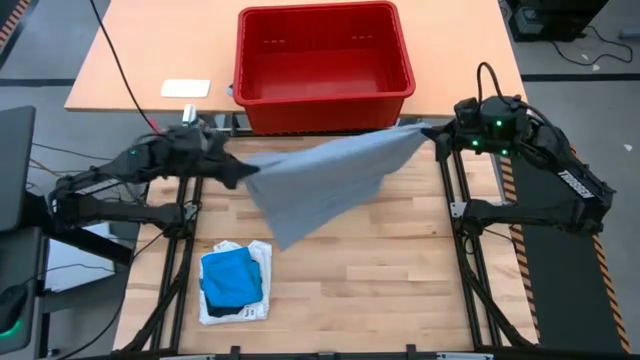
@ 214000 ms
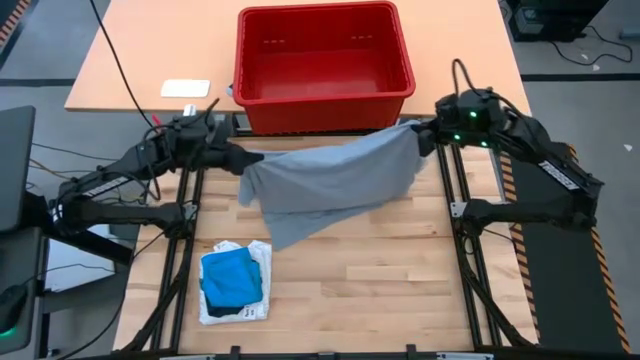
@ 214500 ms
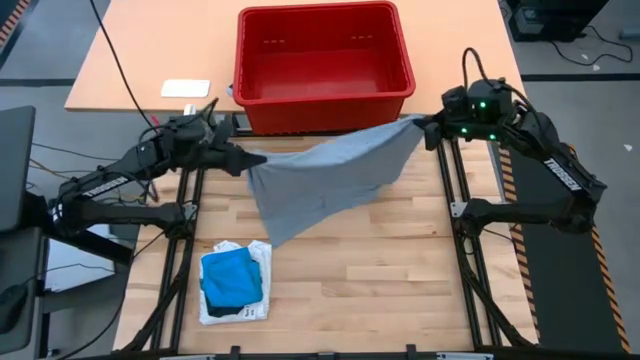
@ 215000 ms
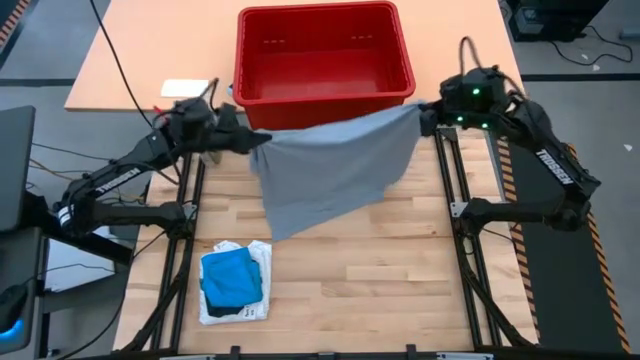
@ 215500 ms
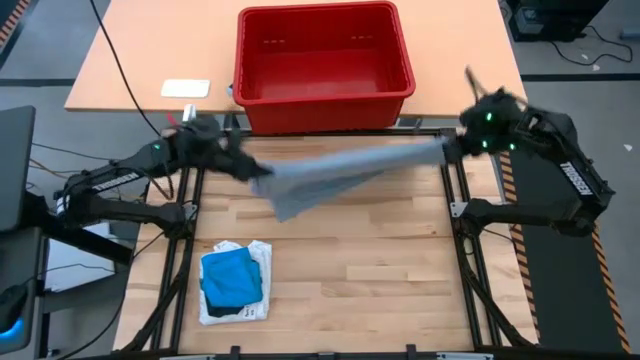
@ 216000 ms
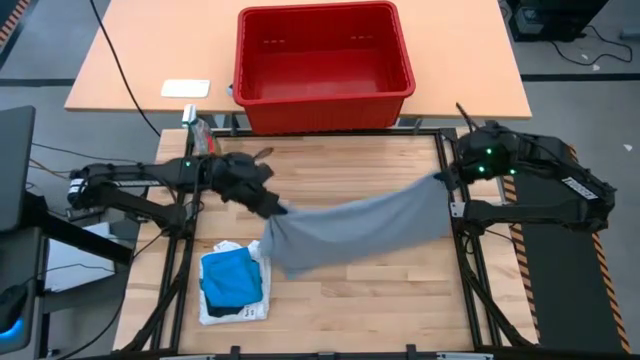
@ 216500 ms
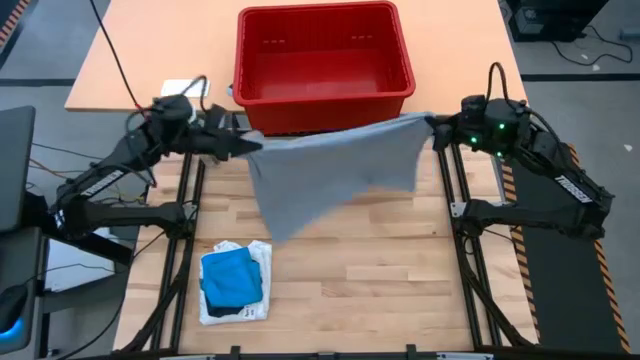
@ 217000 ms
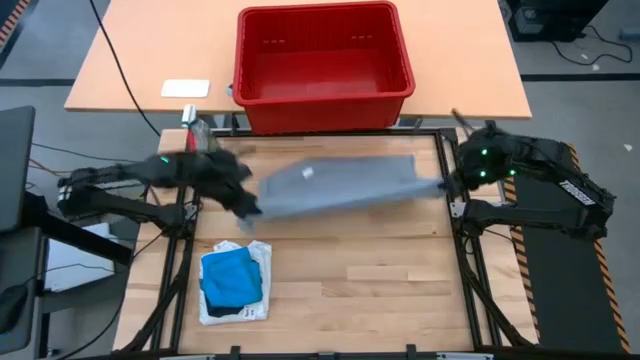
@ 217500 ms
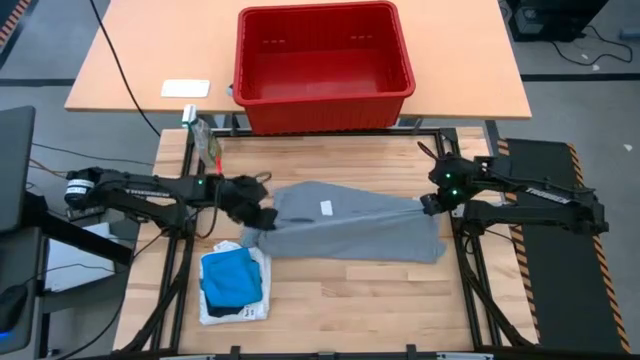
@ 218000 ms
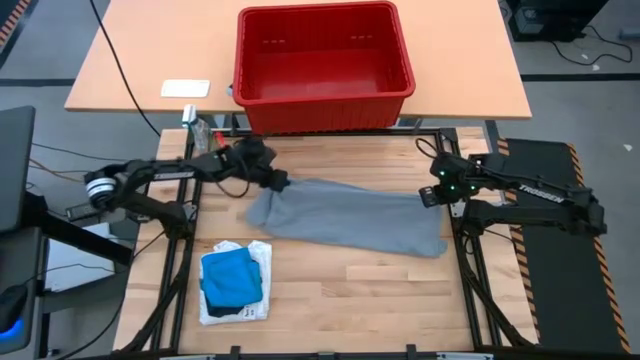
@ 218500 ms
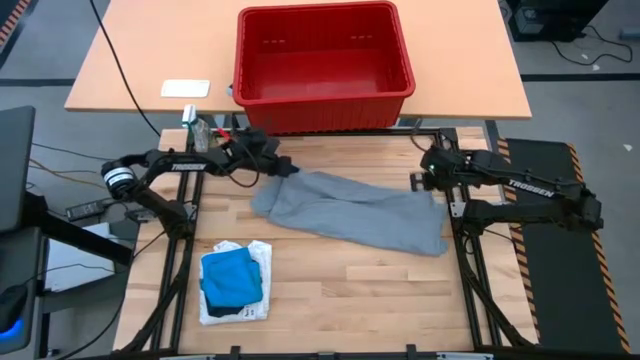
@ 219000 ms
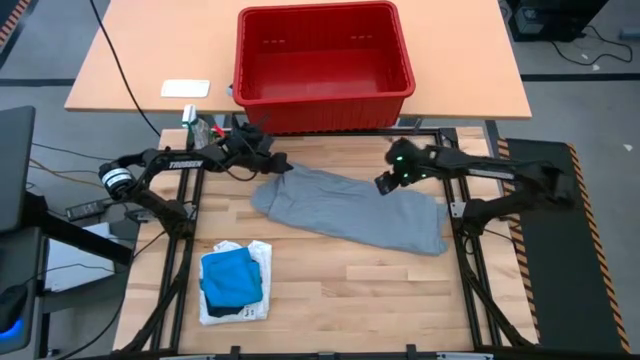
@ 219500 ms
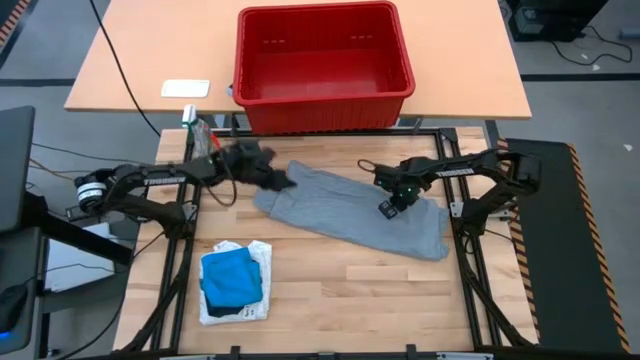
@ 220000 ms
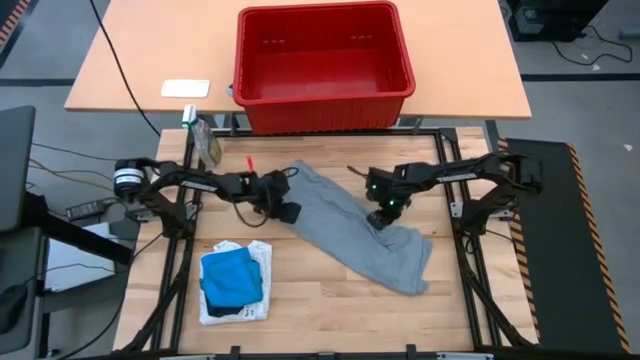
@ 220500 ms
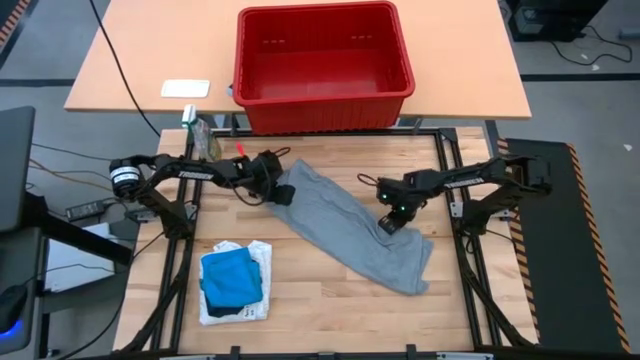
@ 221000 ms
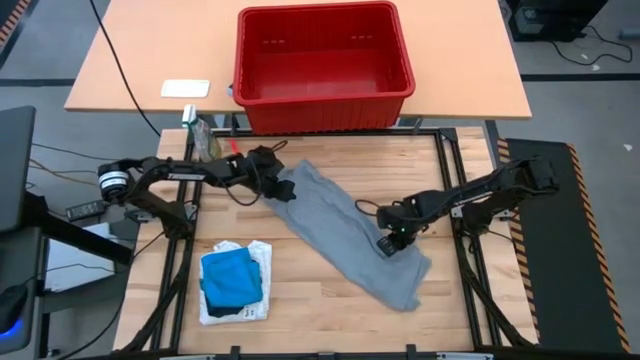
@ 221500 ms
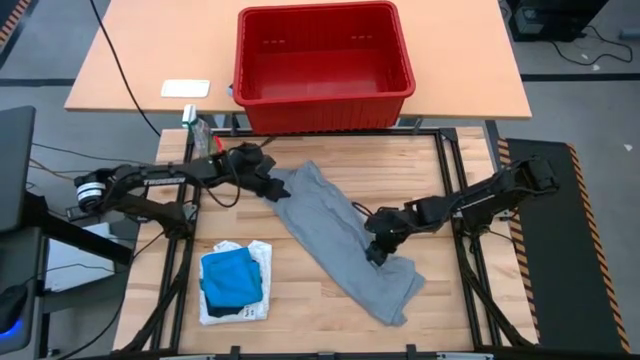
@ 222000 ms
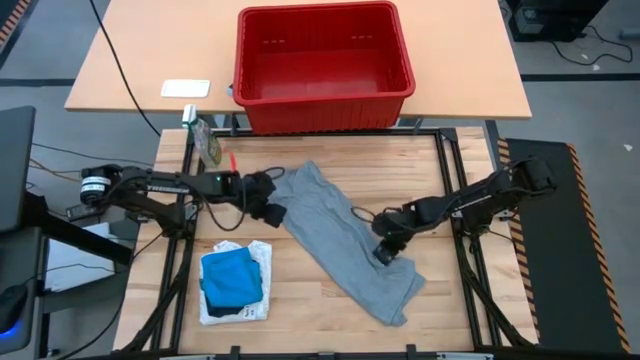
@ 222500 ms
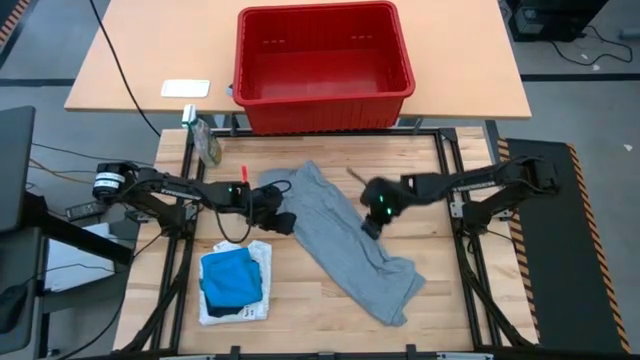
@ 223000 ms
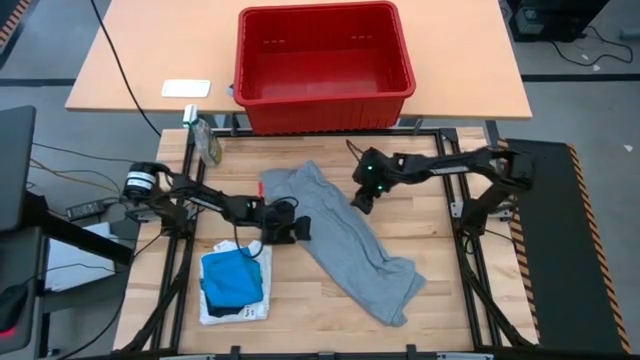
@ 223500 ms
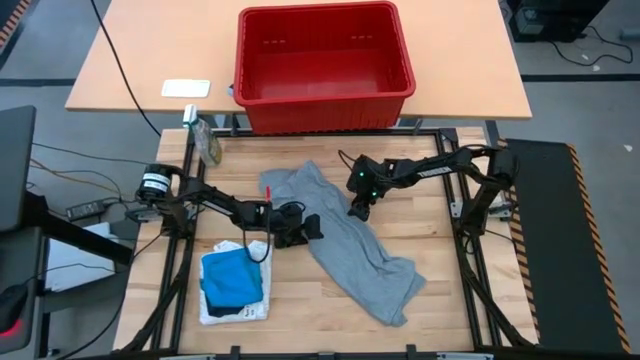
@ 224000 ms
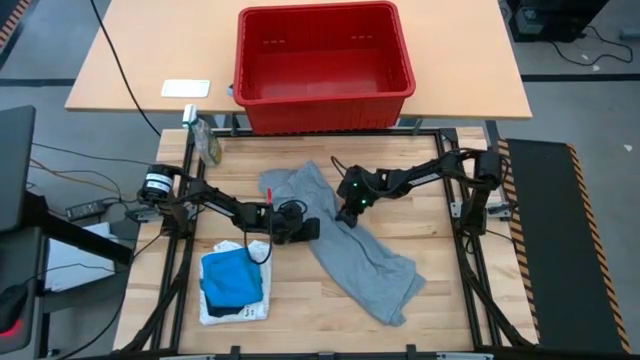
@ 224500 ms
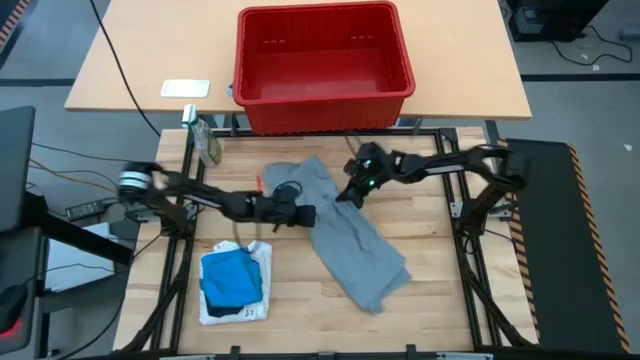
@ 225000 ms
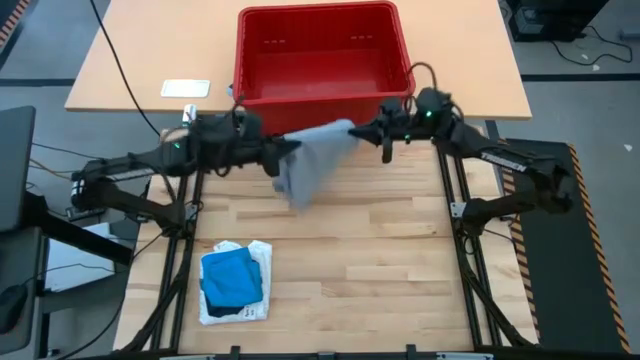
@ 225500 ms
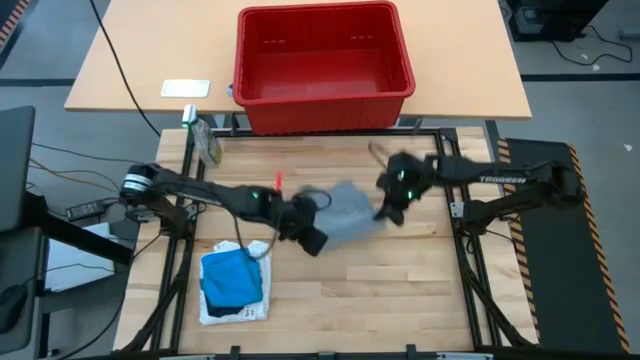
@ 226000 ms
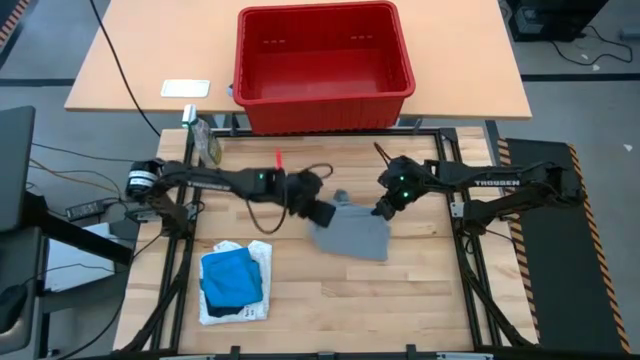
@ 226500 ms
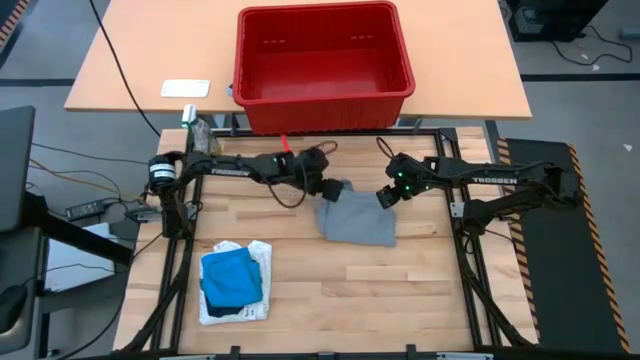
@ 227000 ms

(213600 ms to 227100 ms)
Task: Fold laundry
Fold the grey shirt on the table

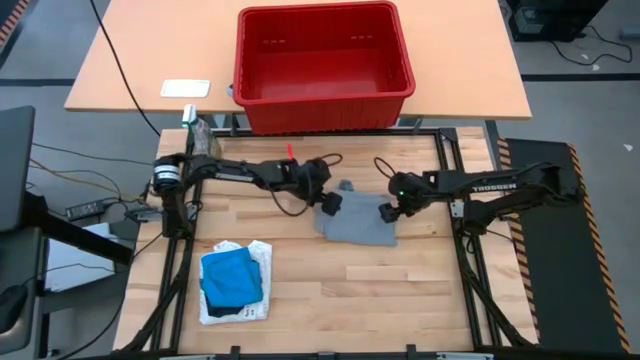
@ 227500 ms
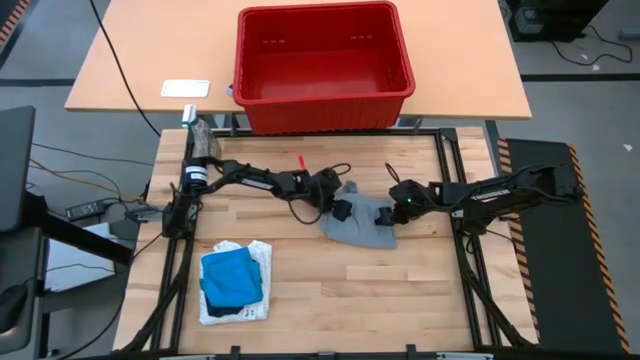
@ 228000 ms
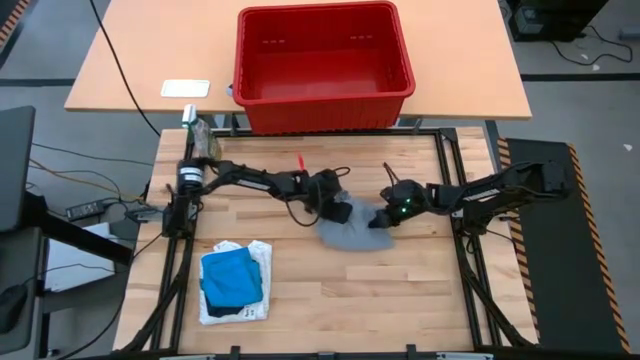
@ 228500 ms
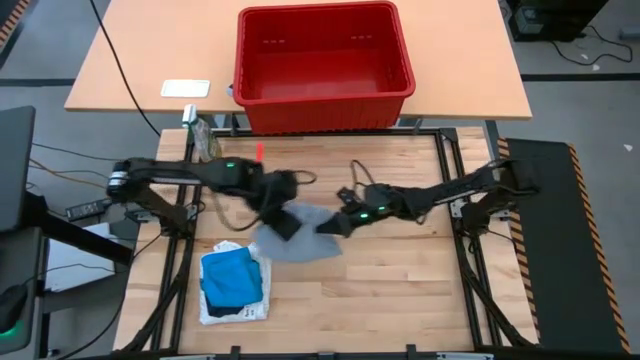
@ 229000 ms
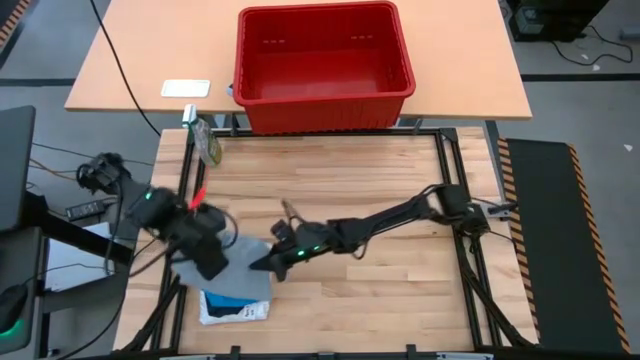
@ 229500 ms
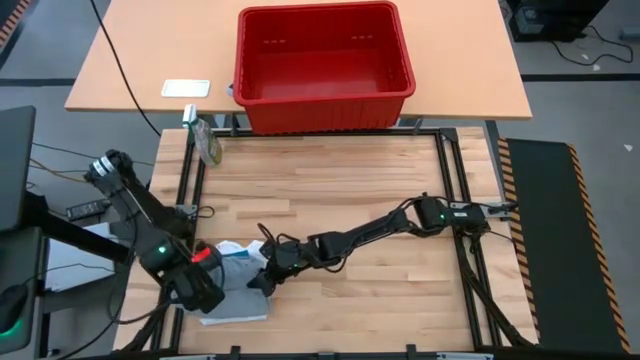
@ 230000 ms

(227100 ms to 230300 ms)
Stack the gray shirt on top of the light blue shorts

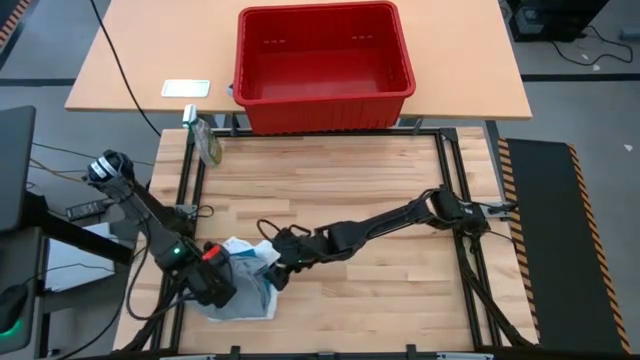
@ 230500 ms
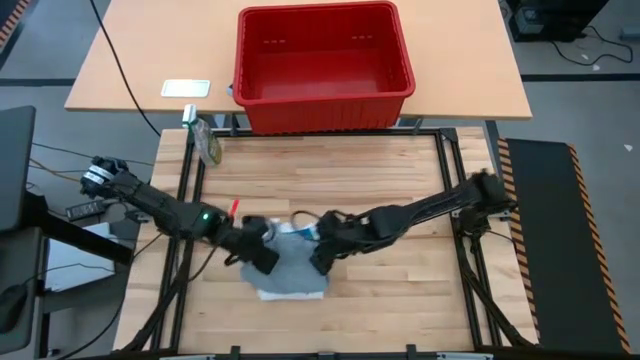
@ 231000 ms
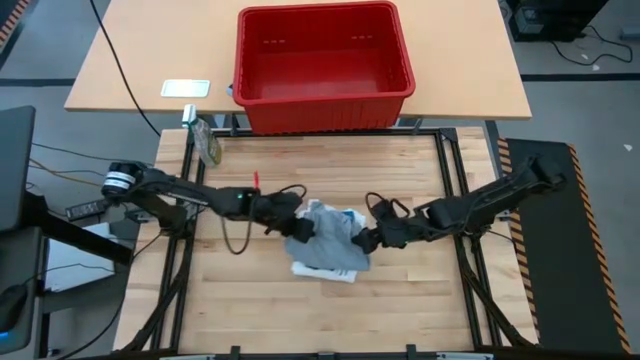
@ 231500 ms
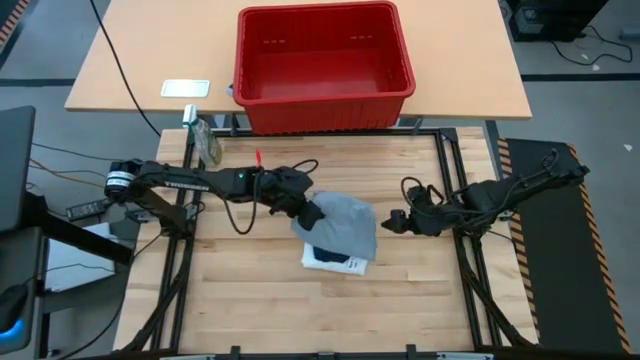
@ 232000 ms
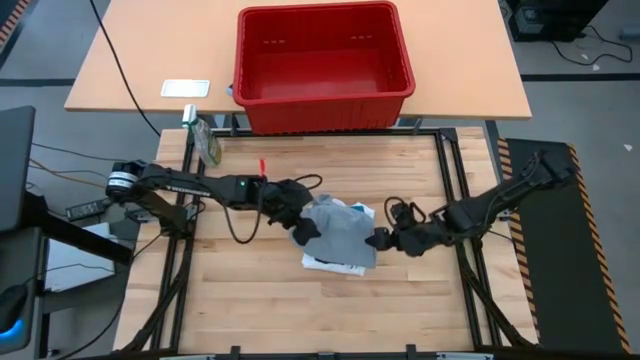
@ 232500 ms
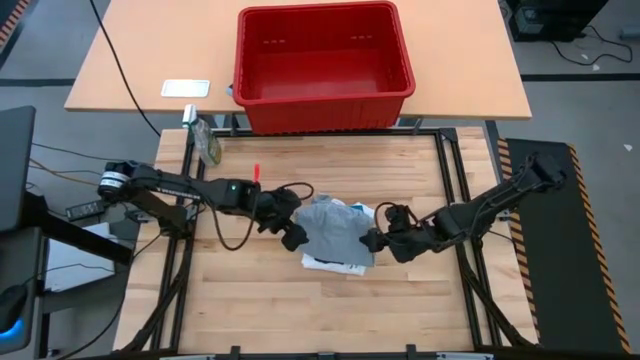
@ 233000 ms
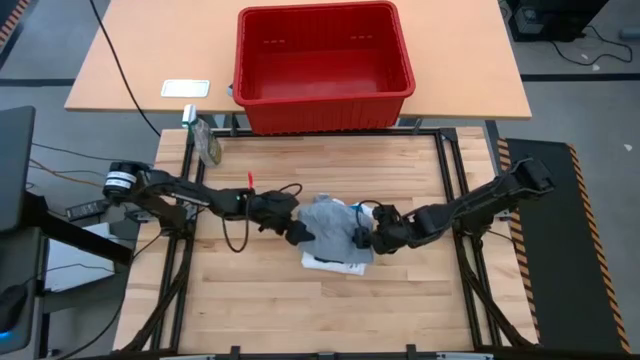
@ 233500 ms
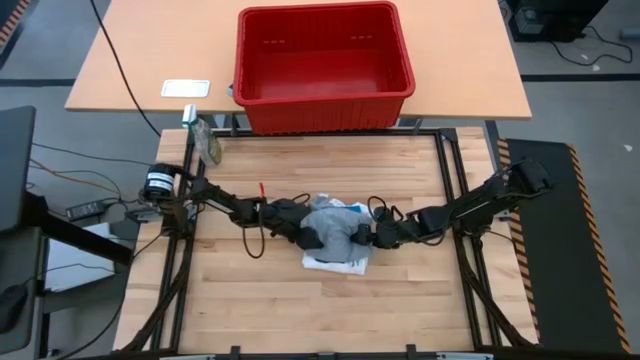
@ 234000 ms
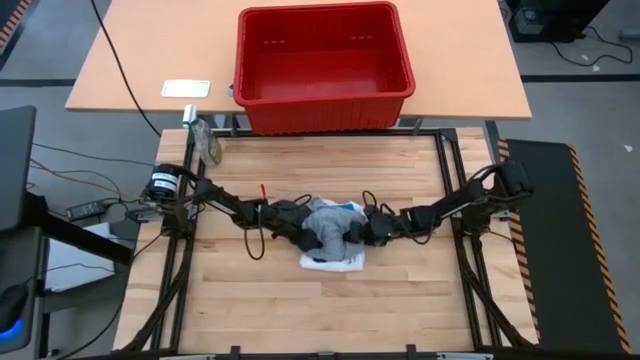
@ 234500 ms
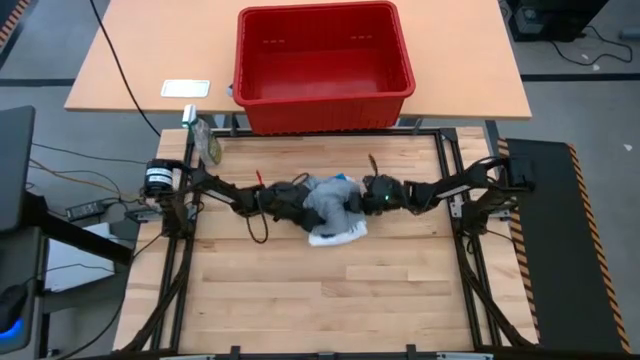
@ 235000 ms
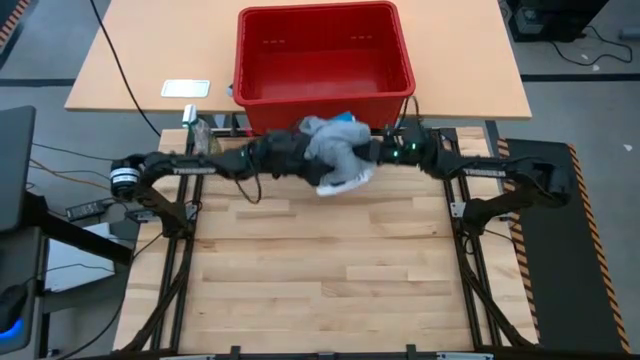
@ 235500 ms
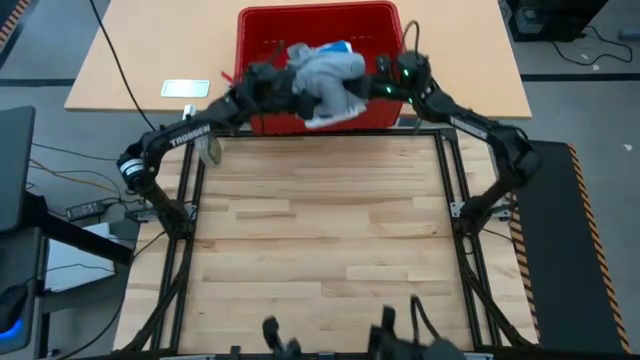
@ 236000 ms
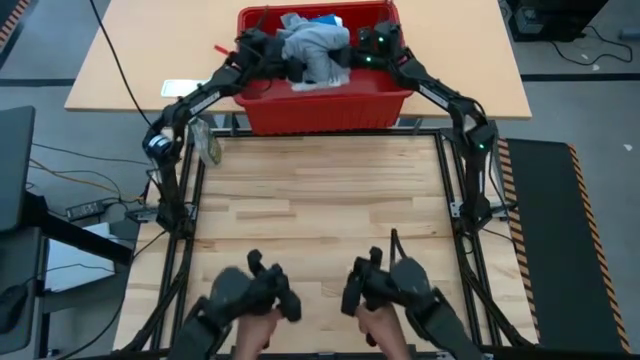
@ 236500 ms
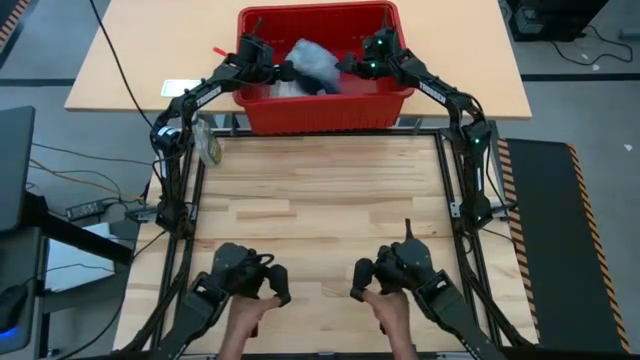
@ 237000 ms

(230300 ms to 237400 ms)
Put the stacked laundry into the red laundry bin
